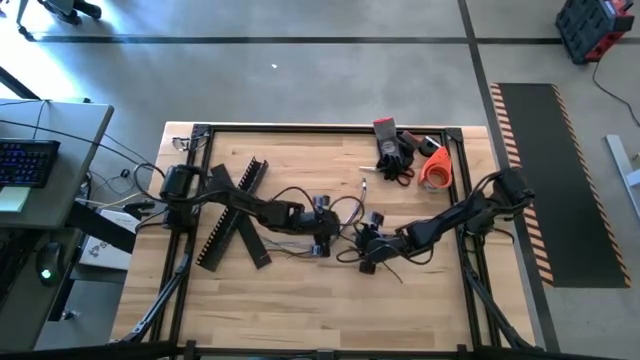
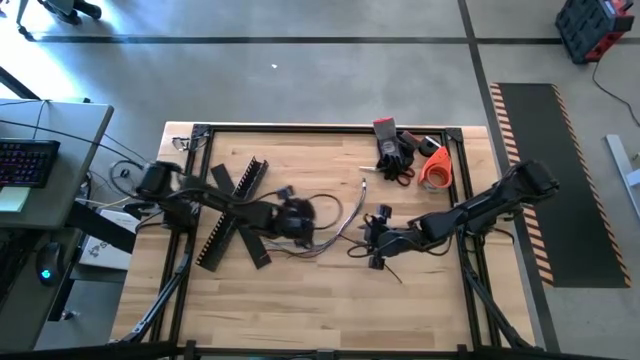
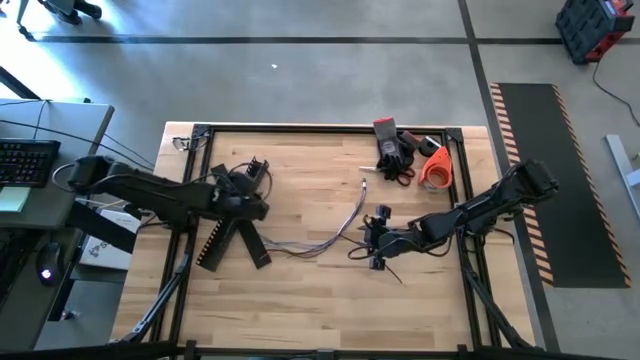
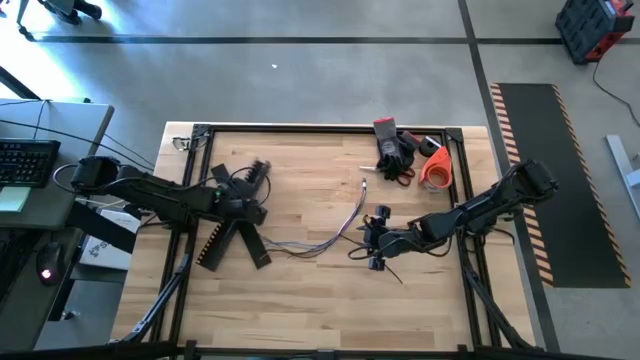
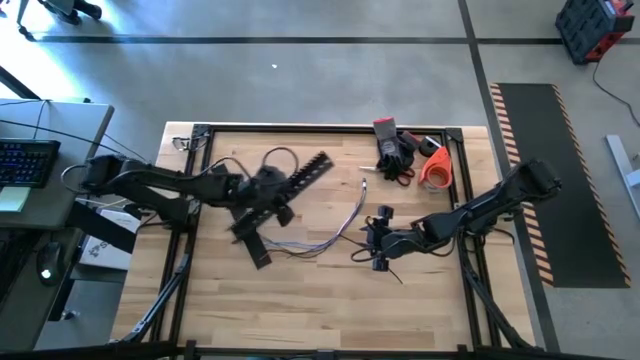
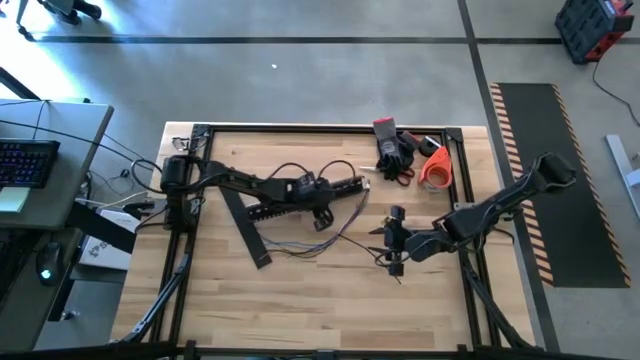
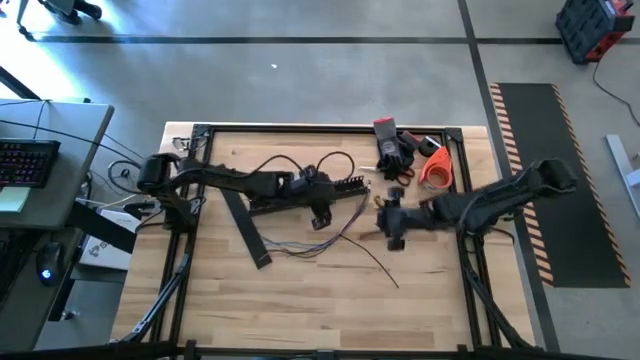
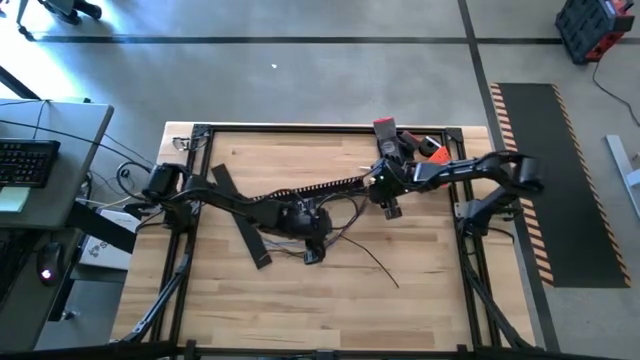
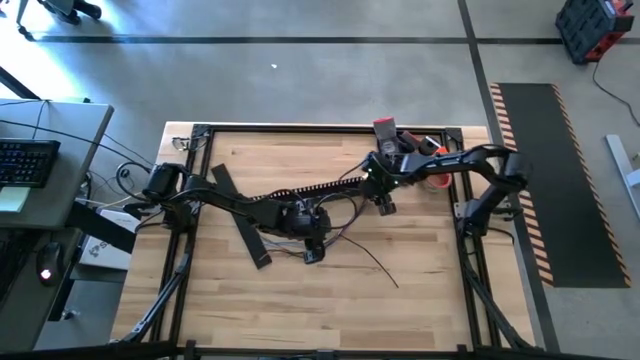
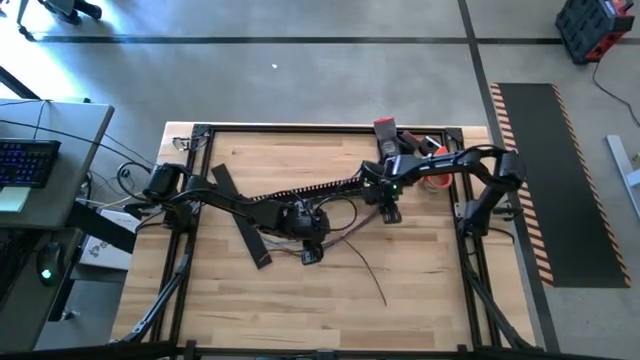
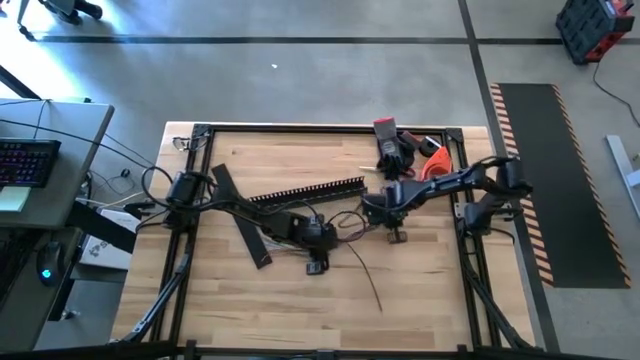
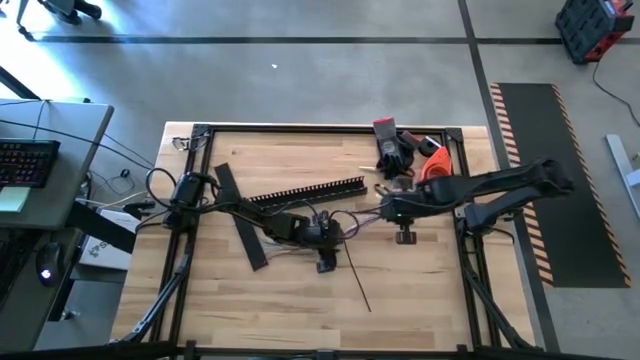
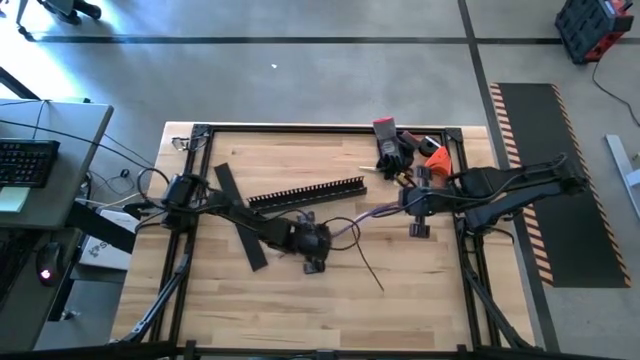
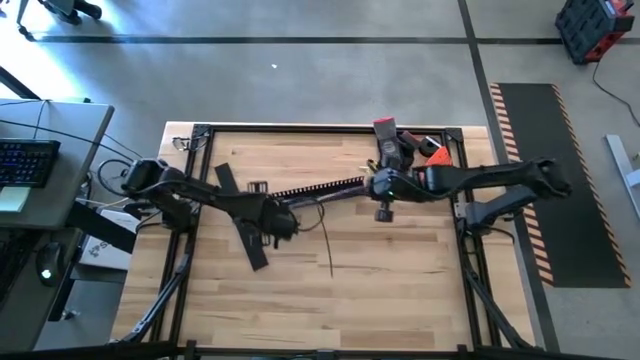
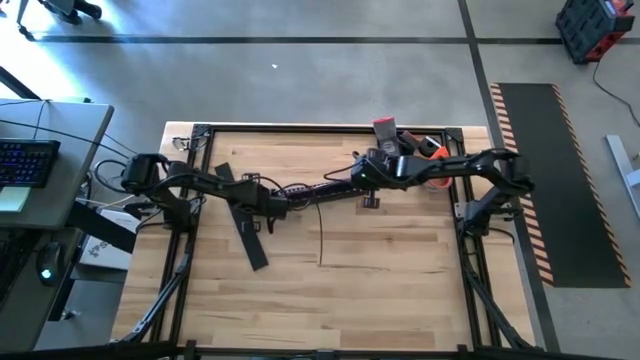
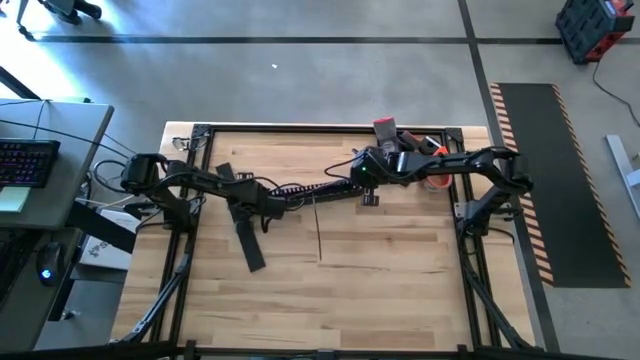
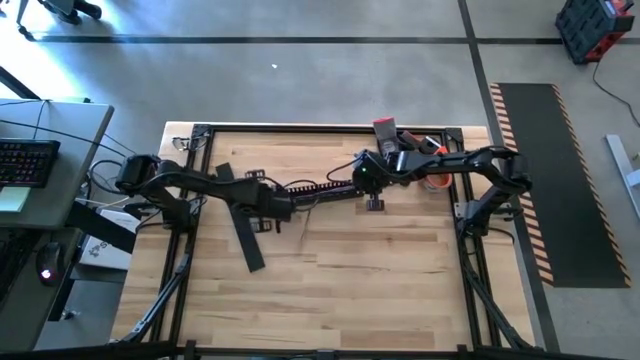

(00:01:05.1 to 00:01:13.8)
Task: Ziptie cables
Put the zip tied cables into the black cable duct

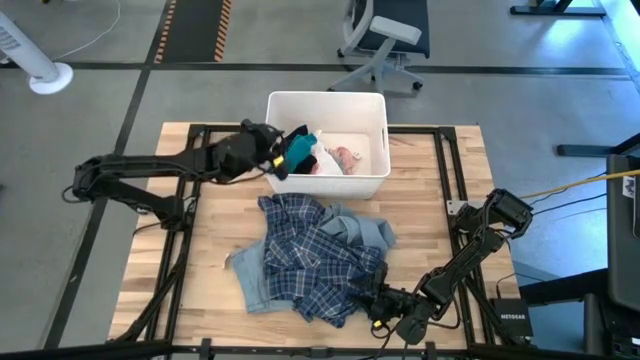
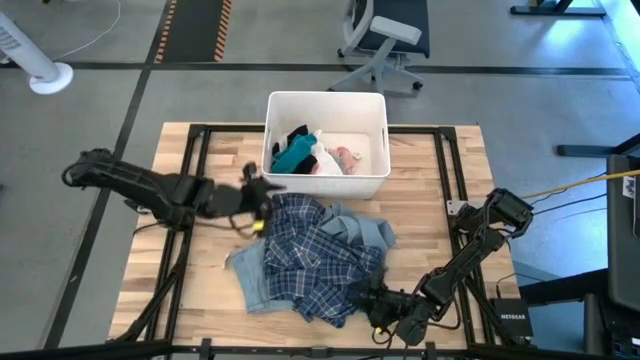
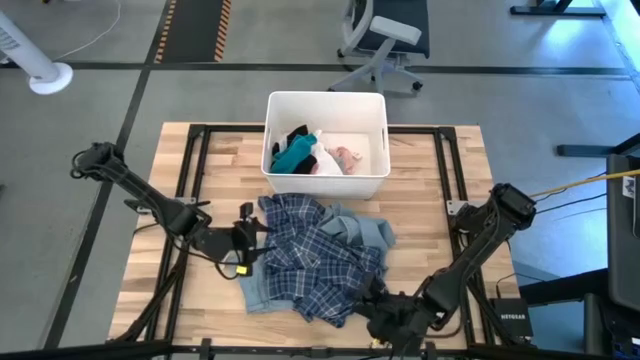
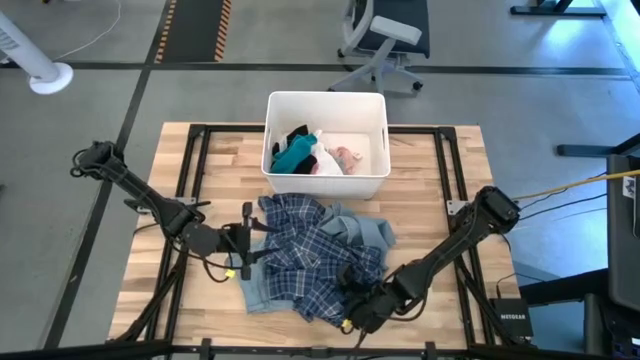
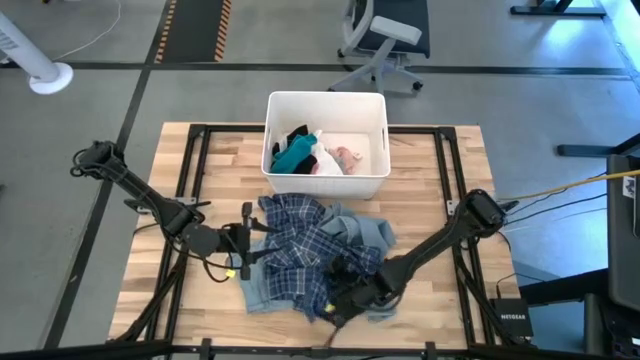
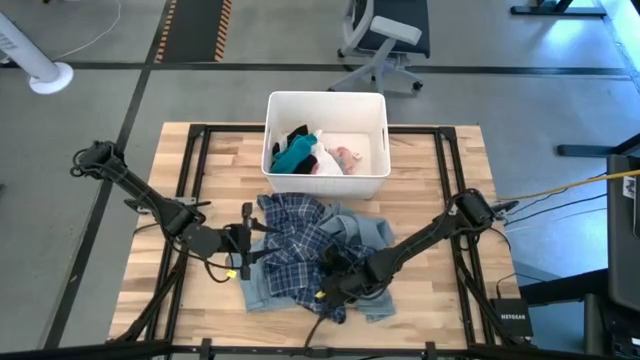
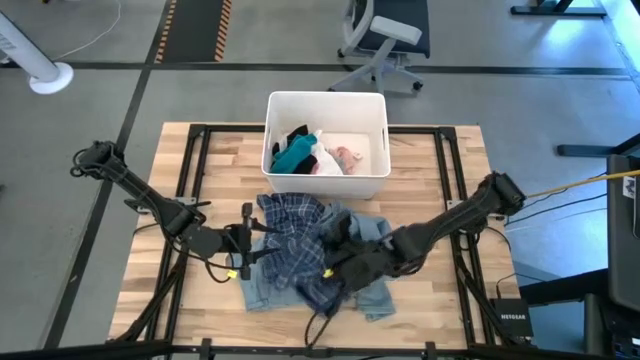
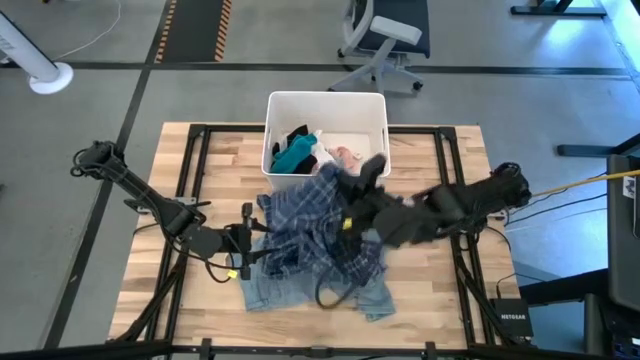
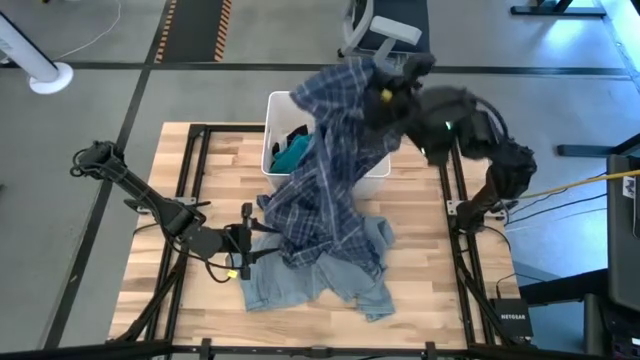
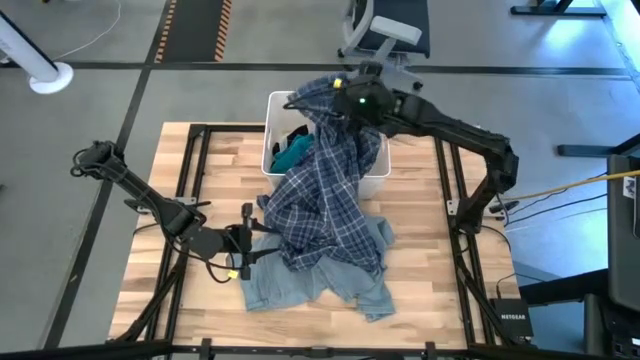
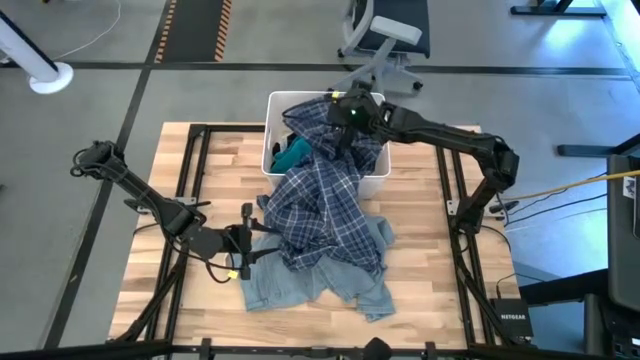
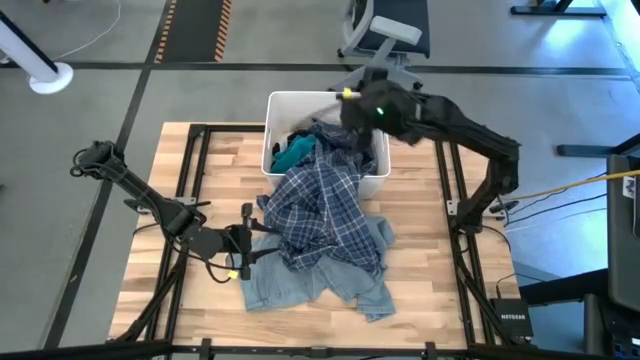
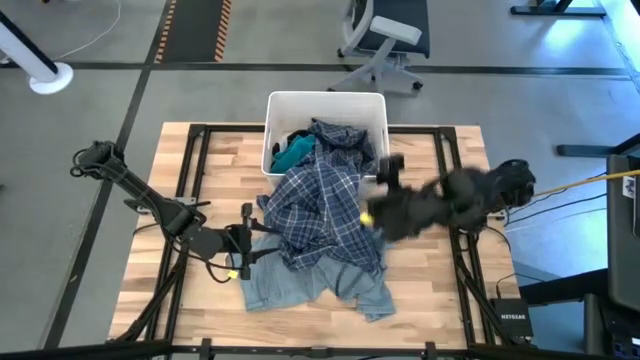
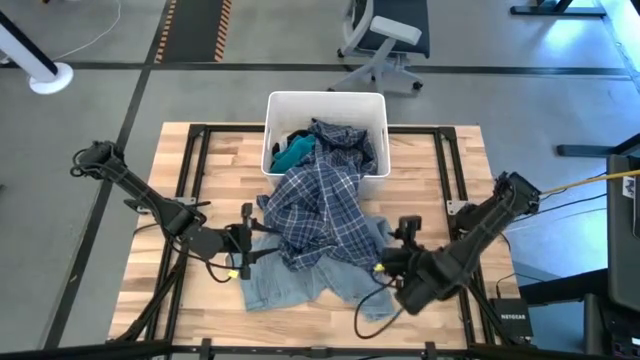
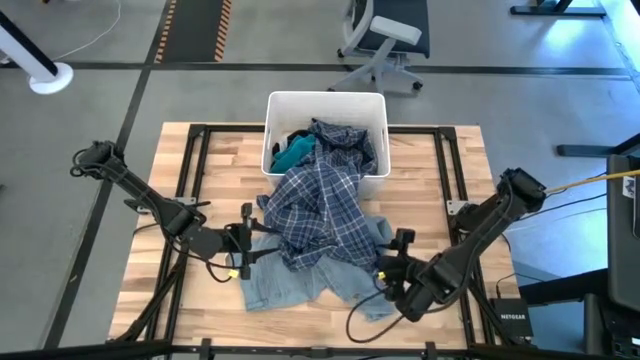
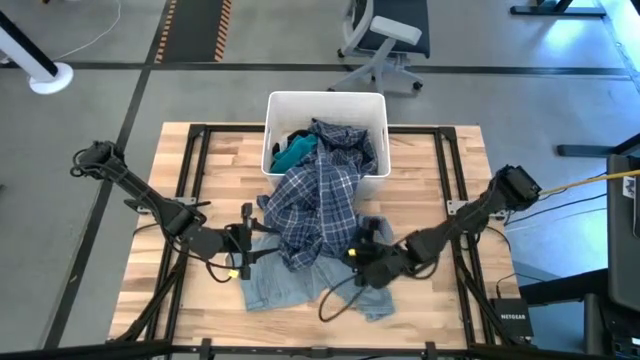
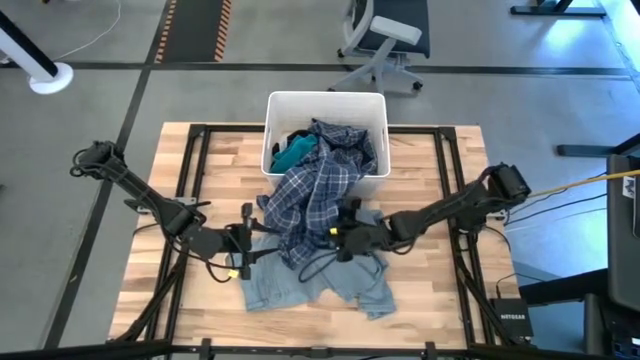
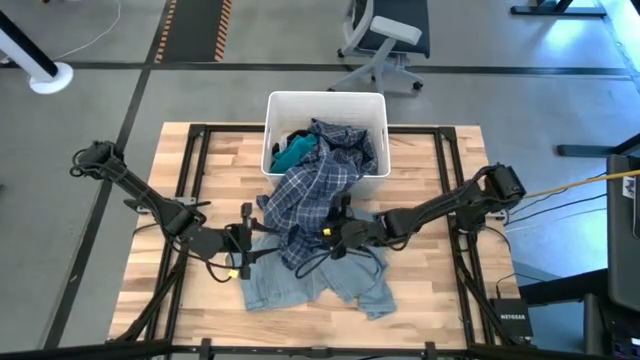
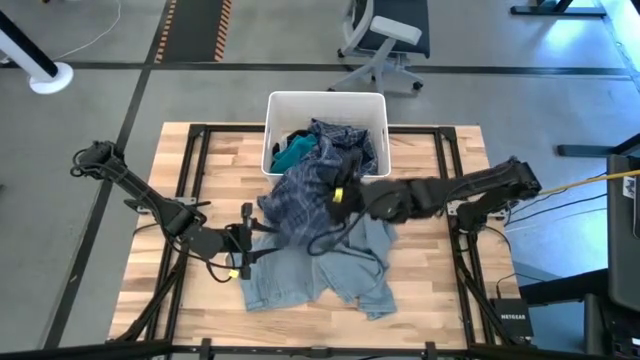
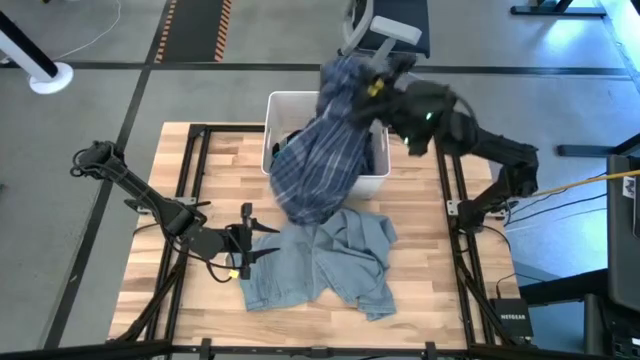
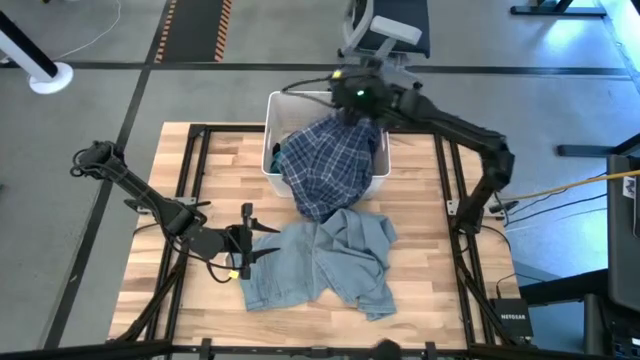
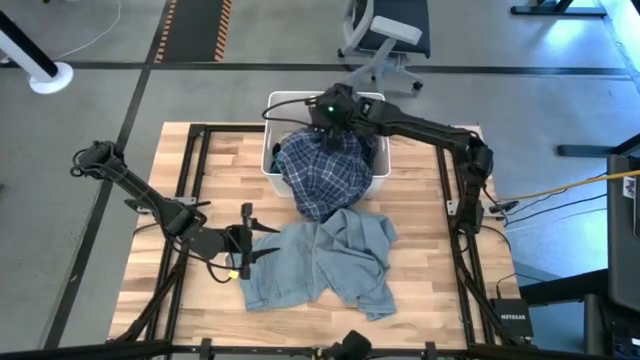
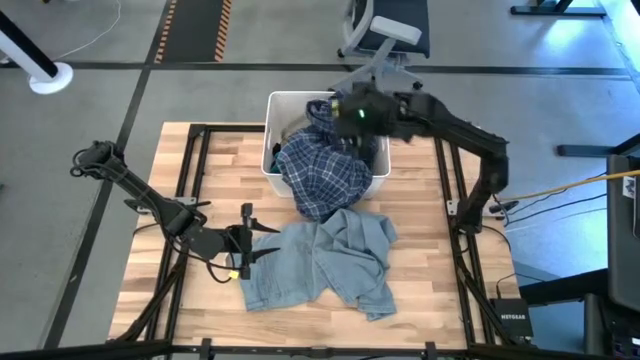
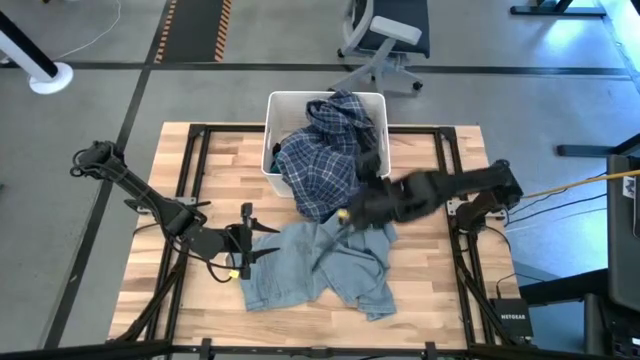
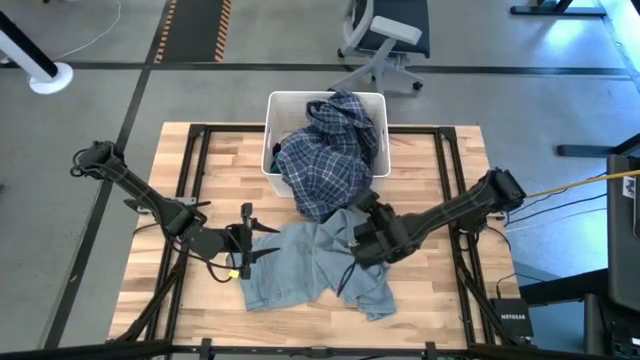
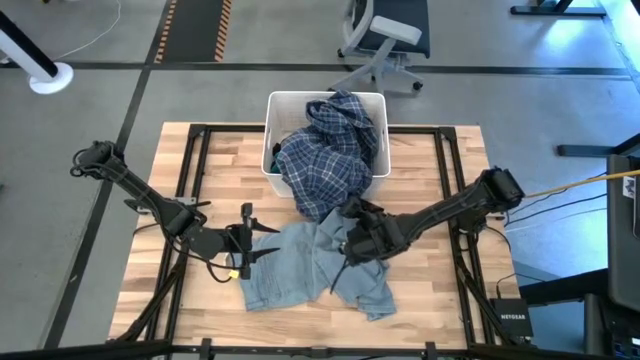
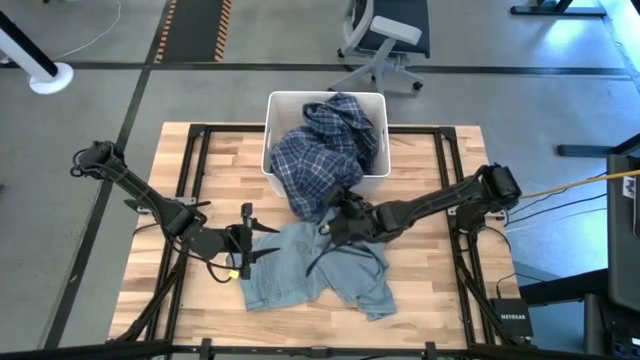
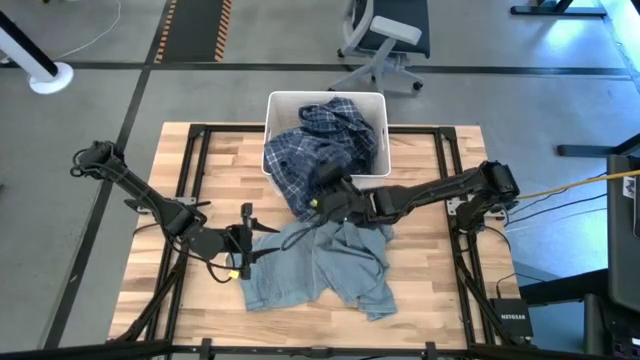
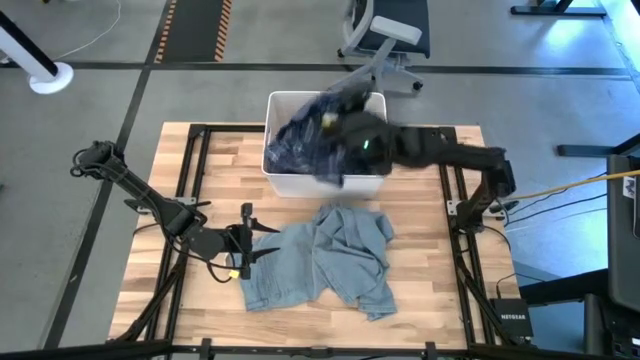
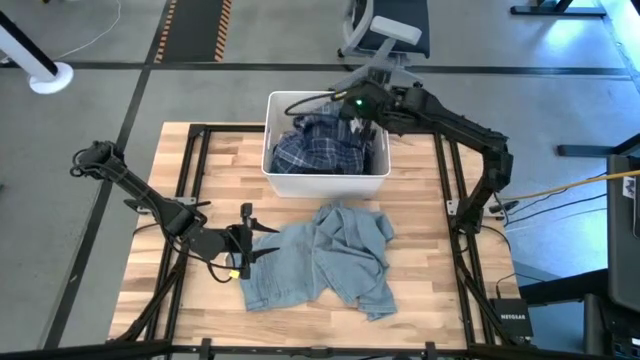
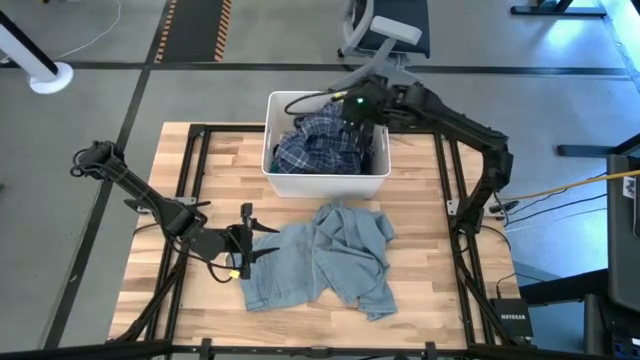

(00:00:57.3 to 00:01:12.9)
Task: Sort clothes
Put the blue checkered pants into the white laundry bin
